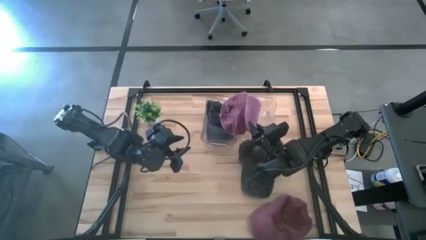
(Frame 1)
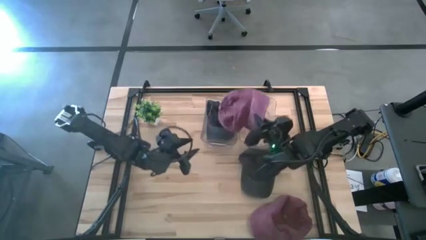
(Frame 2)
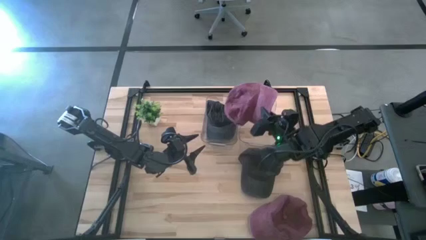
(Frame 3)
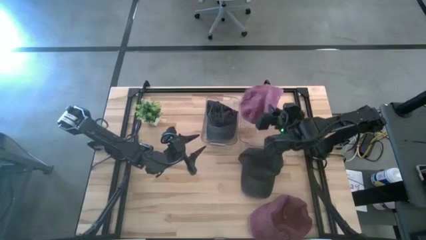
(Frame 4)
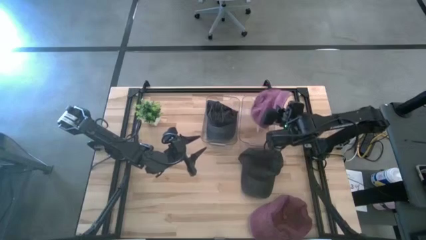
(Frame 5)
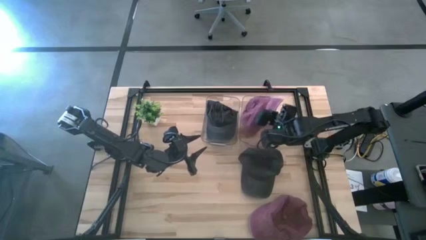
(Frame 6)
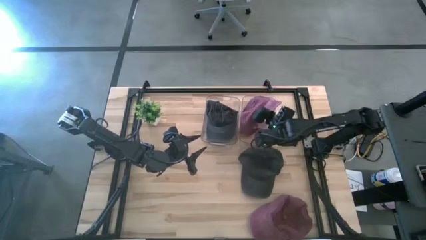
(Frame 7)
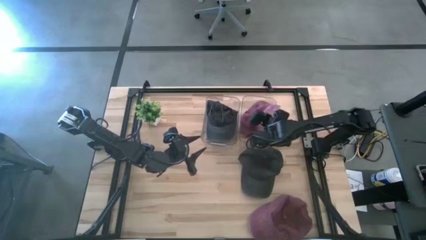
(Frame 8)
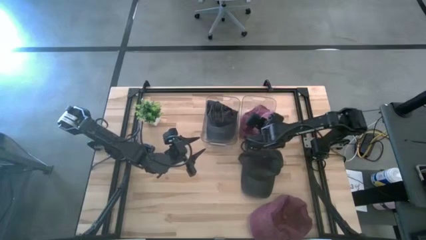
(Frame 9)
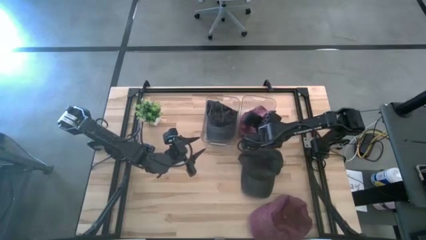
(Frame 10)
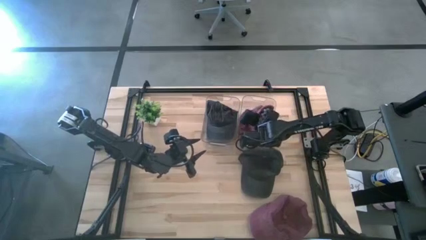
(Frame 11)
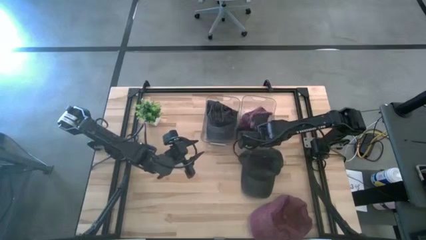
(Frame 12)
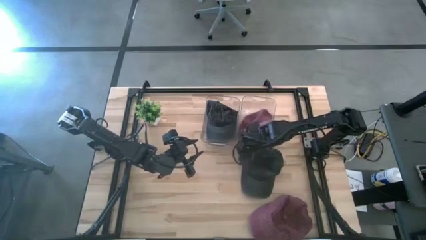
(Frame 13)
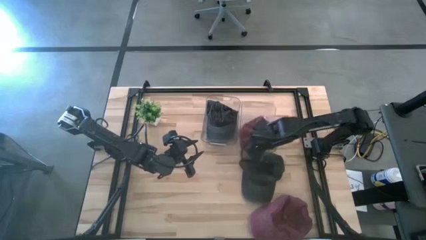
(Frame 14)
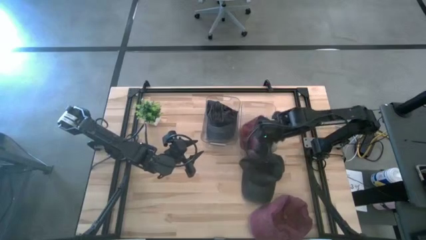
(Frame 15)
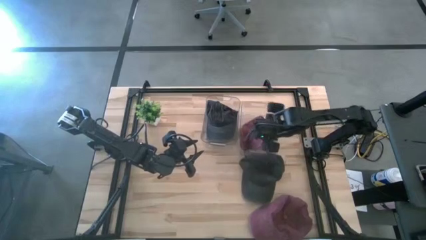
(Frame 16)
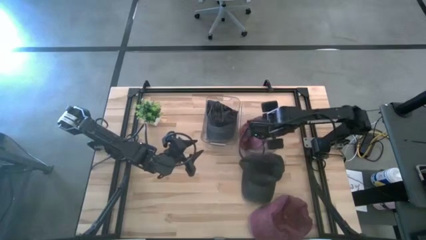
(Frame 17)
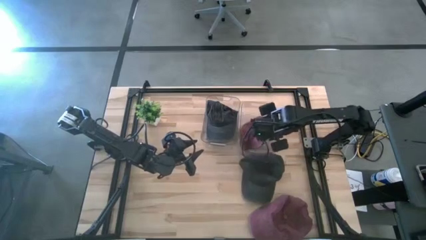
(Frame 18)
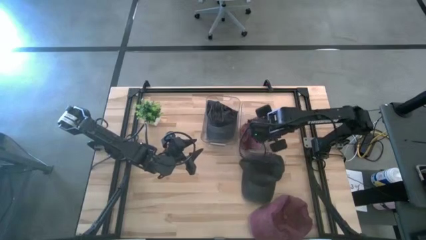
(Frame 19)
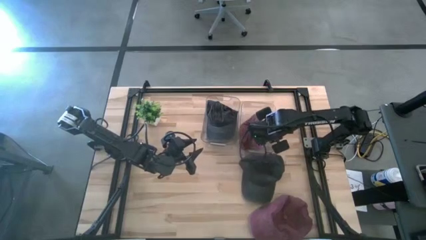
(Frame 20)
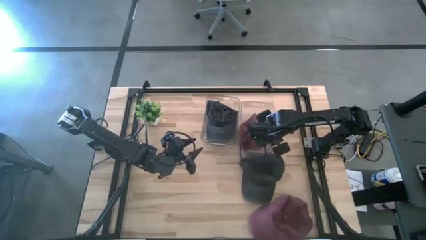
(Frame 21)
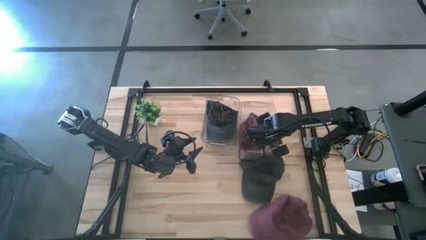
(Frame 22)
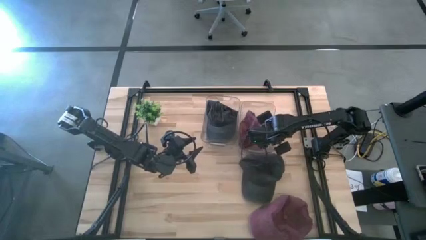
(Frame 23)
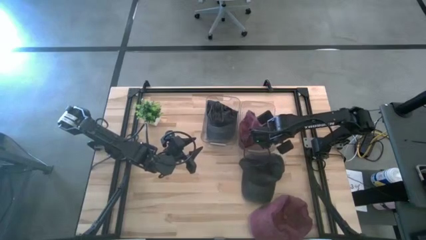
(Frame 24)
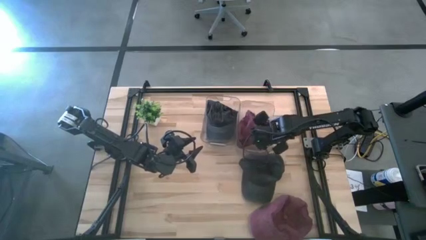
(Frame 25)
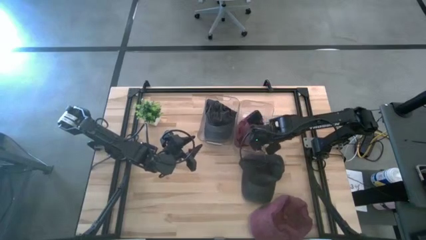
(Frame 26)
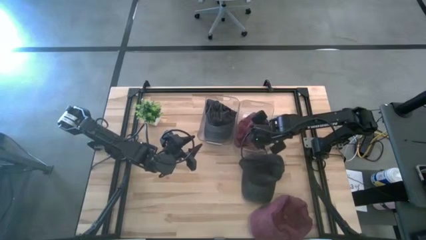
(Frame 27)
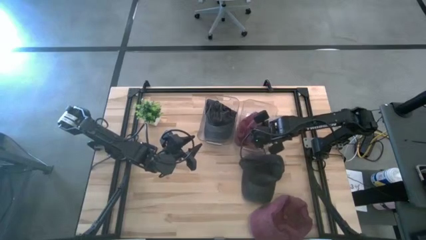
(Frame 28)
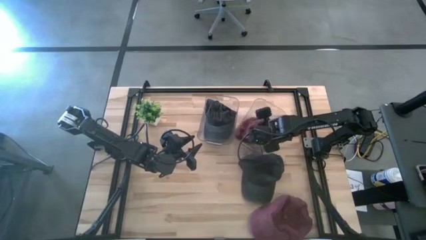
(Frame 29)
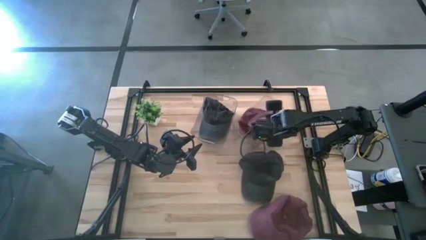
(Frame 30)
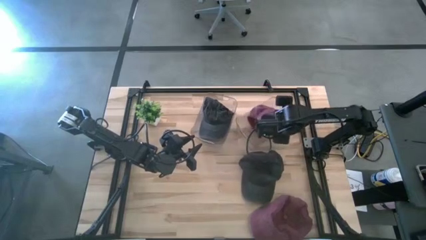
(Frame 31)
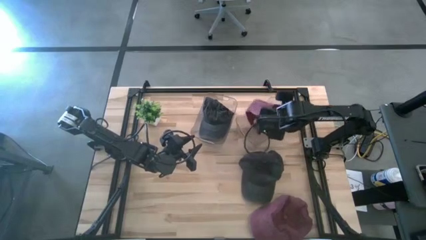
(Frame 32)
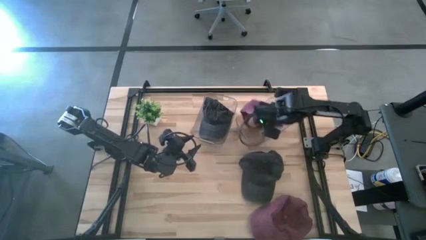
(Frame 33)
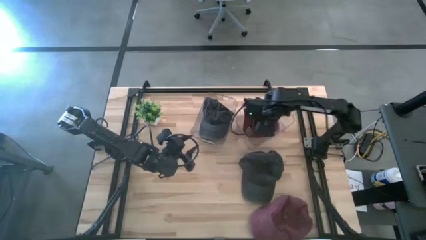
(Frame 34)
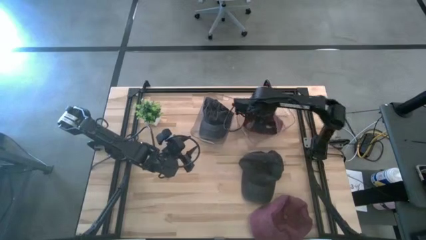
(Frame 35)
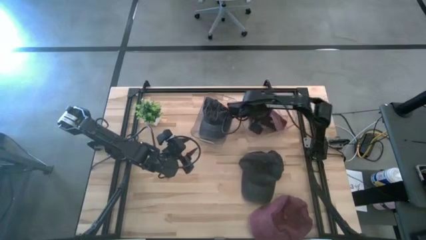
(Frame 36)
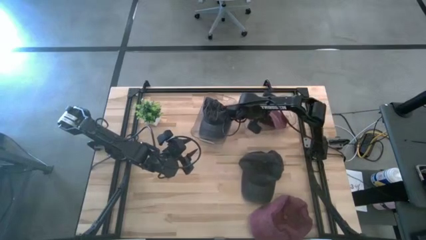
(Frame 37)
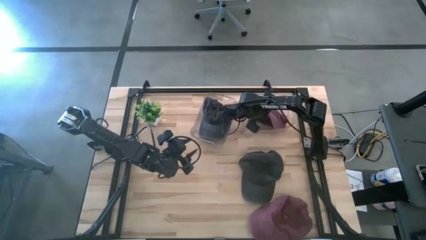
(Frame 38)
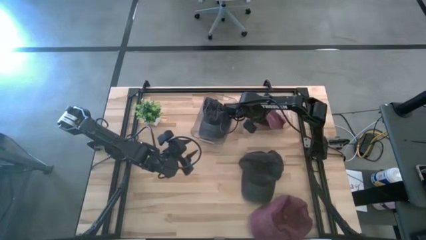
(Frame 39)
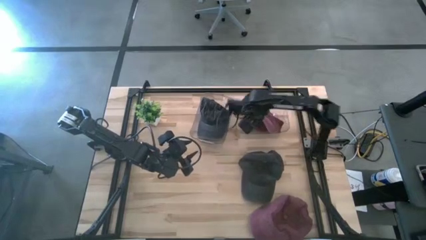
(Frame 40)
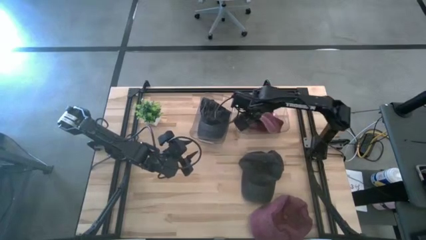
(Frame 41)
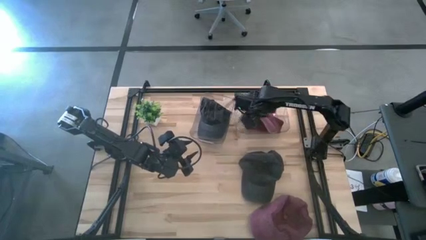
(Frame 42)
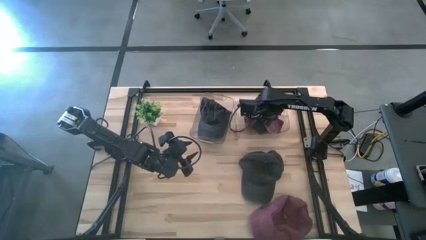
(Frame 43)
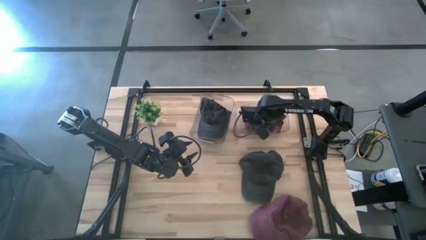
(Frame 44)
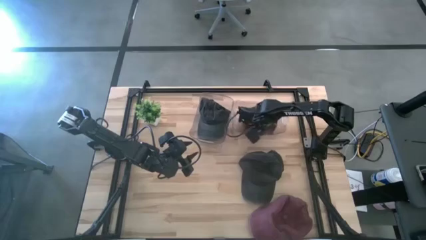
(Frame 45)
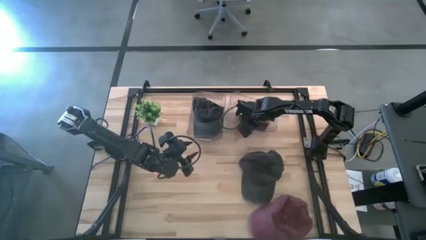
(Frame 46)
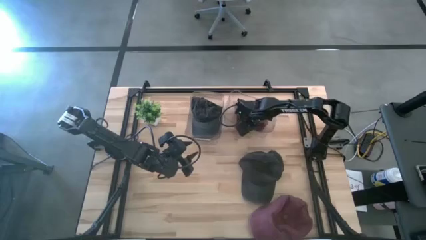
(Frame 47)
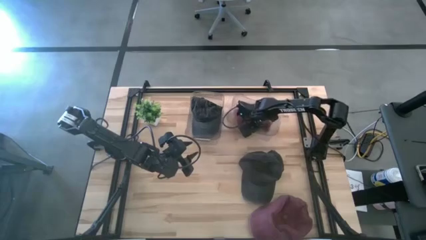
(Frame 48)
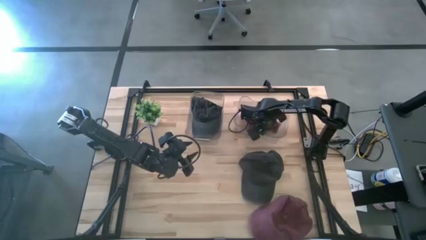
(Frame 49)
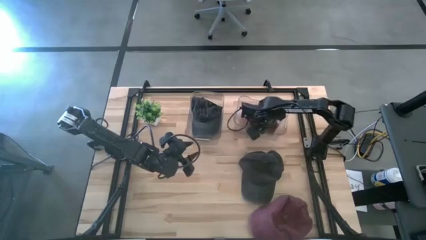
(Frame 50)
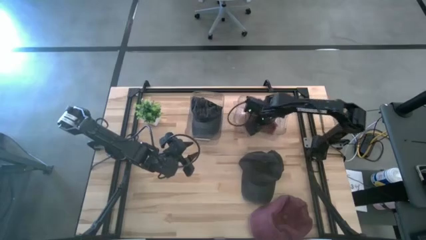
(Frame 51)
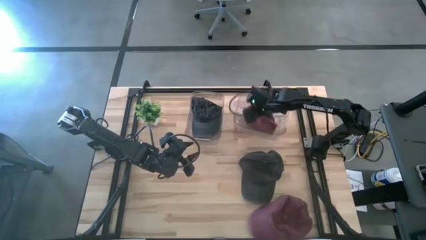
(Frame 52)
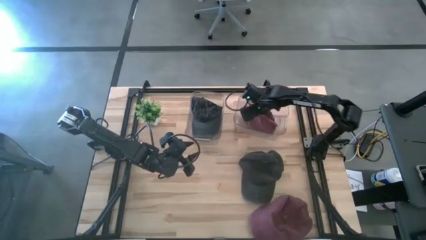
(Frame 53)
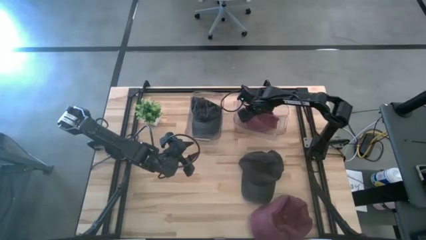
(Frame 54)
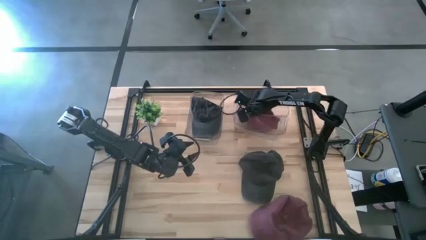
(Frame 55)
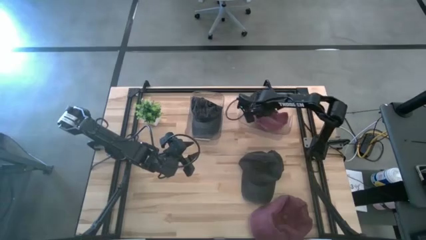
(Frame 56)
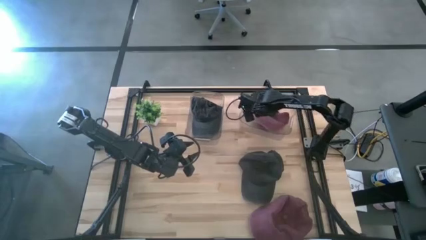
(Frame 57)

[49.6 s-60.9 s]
Task: Pick & Place hat
Put the red cap into the right transparent bin

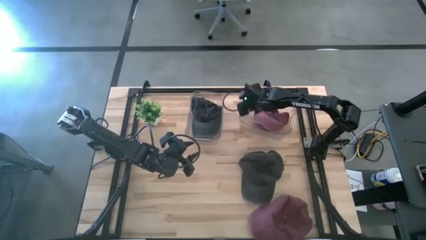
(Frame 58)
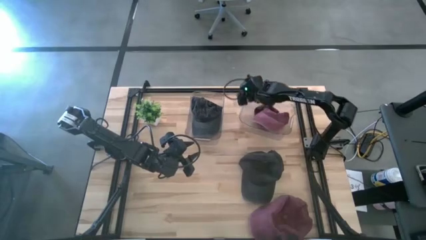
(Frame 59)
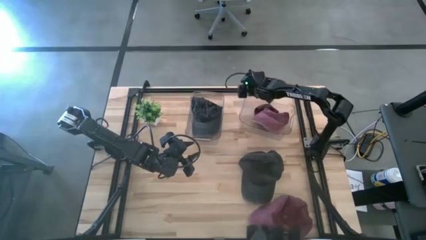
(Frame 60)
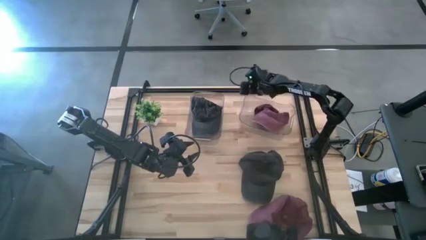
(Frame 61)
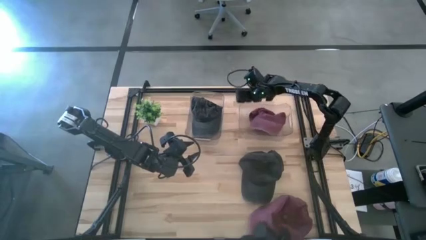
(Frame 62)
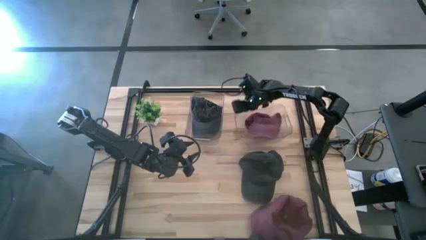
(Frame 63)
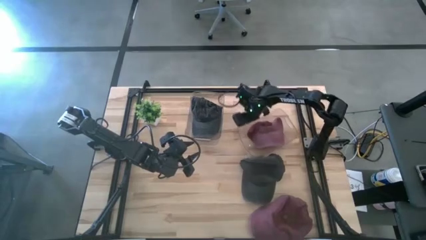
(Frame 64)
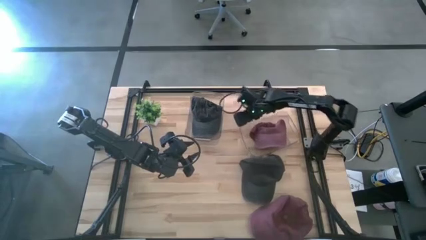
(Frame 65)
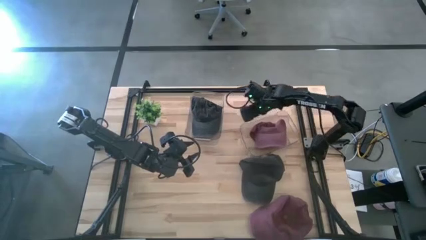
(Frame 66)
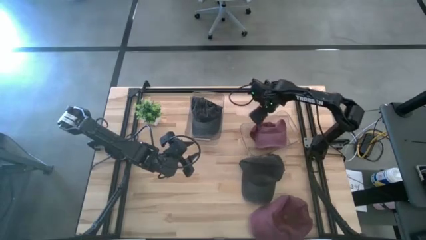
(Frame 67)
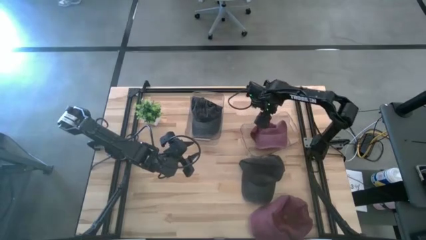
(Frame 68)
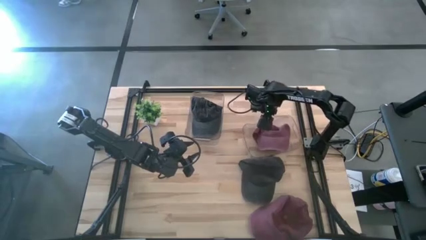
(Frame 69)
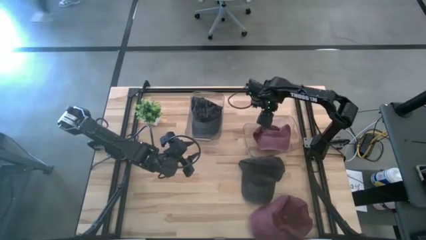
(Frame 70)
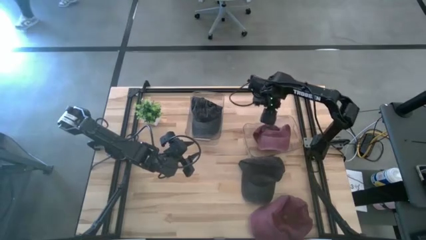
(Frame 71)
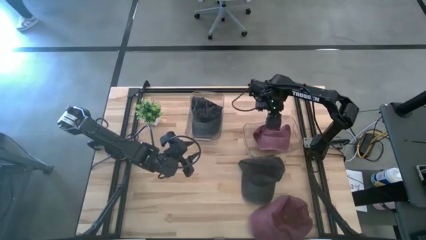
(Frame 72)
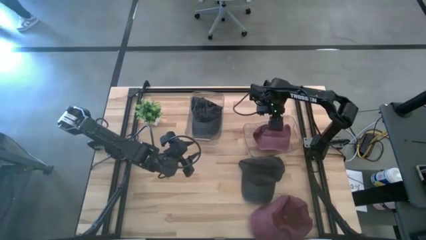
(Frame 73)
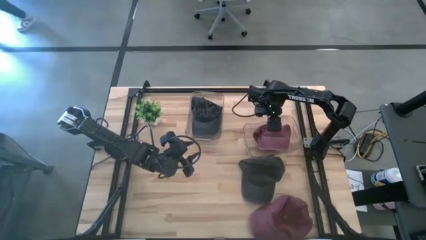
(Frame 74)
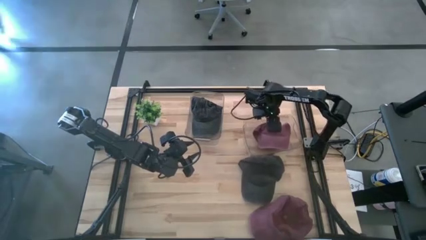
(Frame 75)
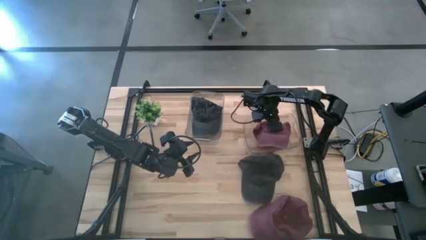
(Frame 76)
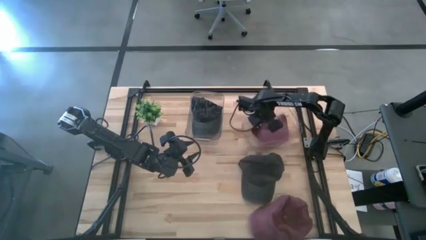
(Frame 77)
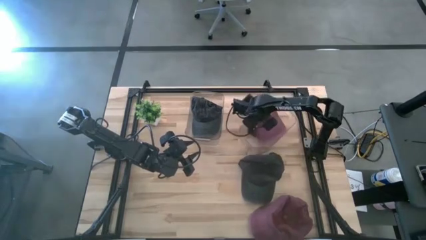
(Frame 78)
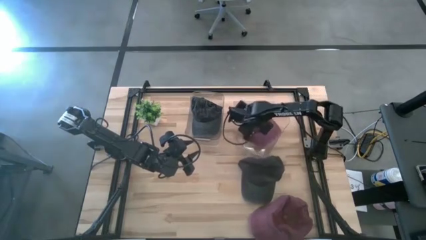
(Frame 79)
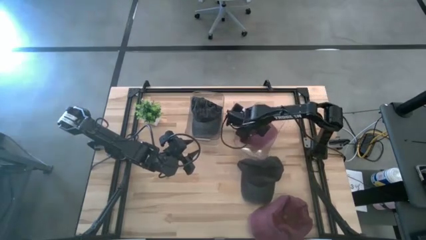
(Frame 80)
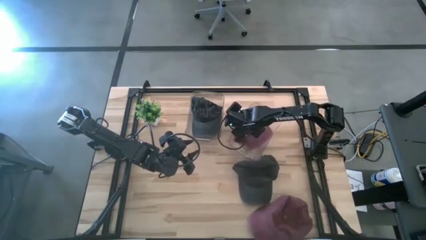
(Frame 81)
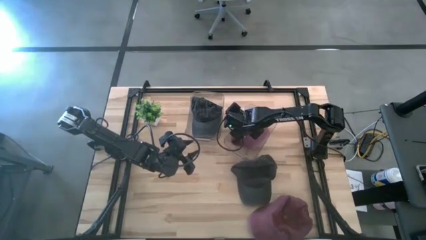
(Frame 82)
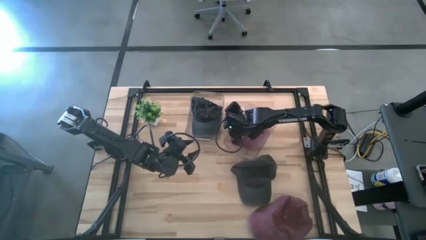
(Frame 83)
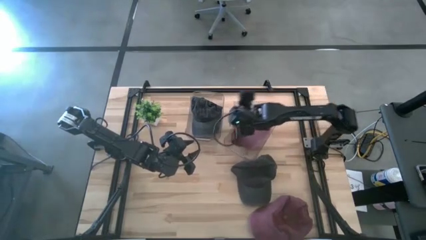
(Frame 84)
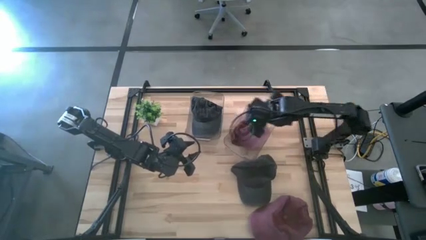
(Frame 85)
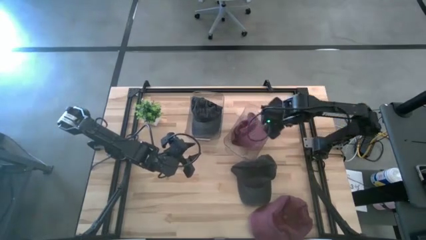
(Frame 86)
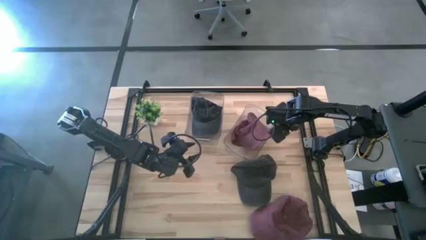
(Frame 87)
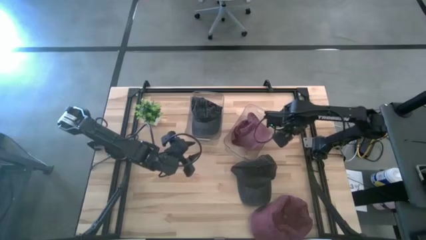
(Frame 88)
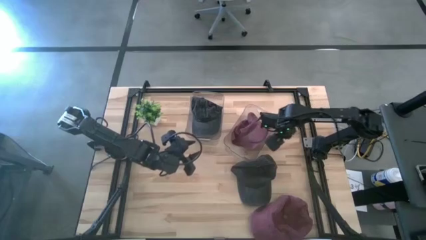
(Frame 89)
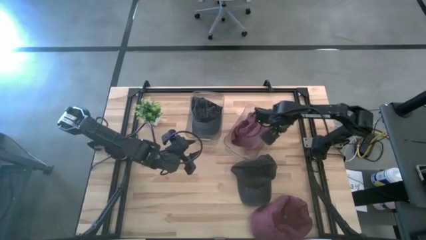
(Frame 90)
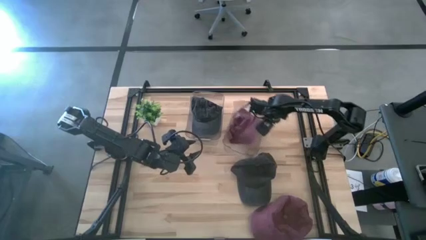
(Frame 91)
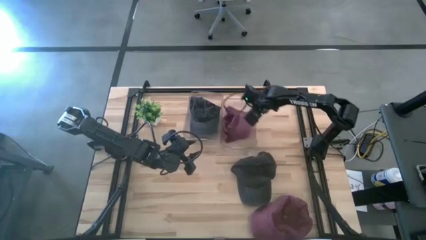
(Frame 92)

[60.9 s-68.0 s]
Adjust the right transparent bin on the table
